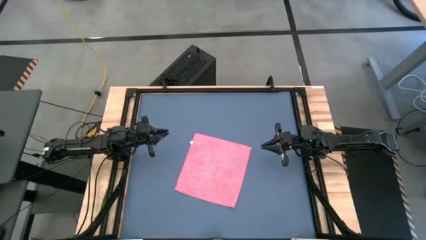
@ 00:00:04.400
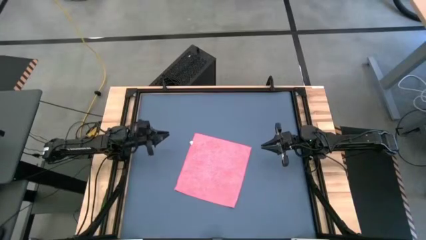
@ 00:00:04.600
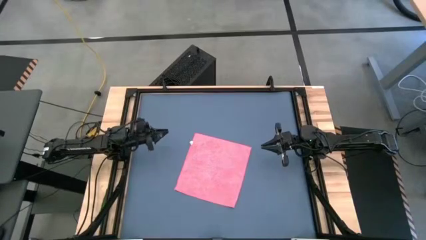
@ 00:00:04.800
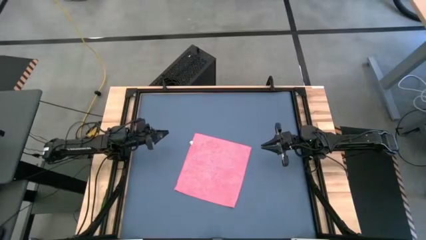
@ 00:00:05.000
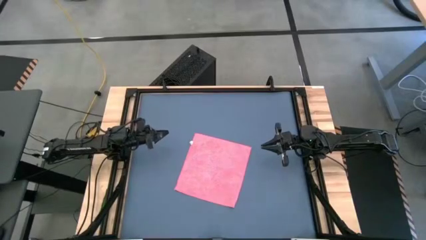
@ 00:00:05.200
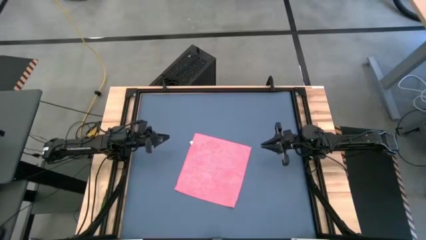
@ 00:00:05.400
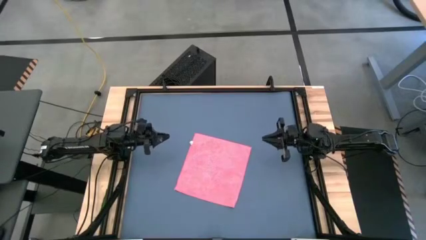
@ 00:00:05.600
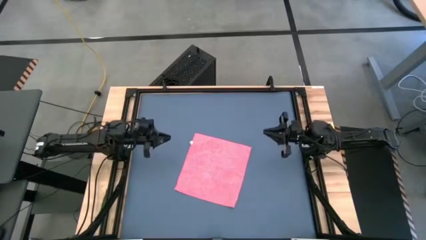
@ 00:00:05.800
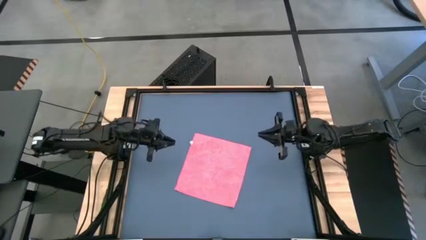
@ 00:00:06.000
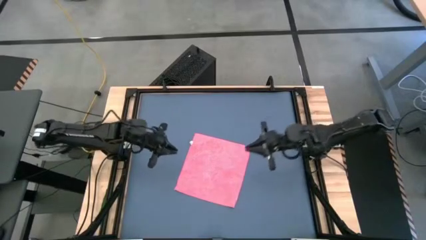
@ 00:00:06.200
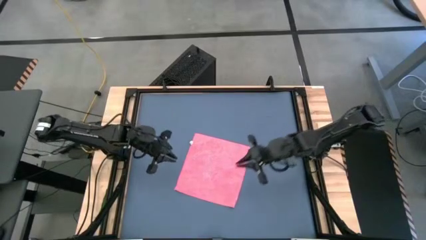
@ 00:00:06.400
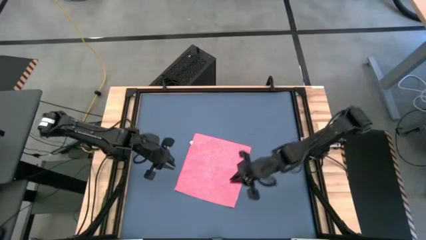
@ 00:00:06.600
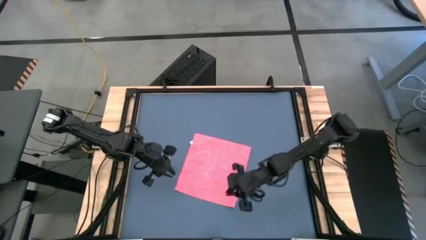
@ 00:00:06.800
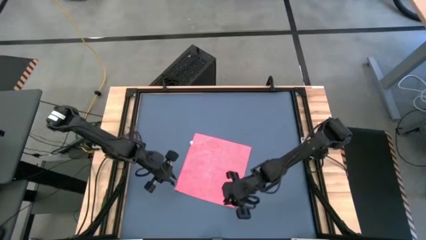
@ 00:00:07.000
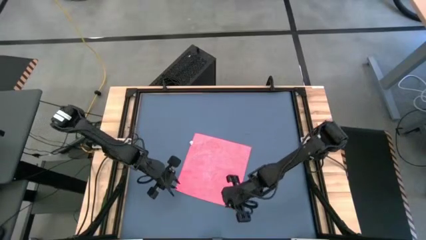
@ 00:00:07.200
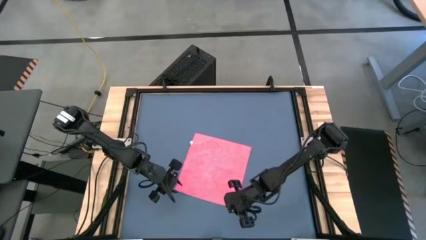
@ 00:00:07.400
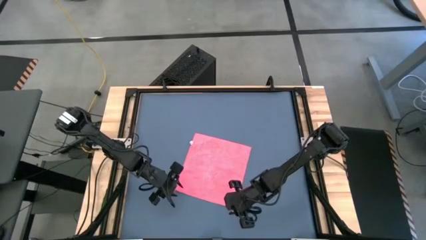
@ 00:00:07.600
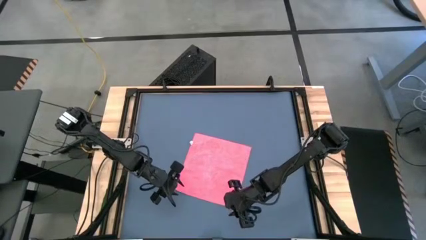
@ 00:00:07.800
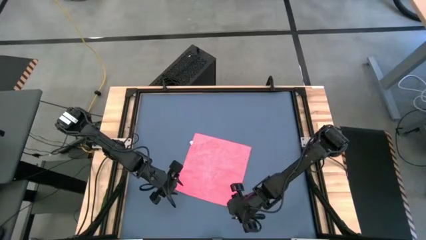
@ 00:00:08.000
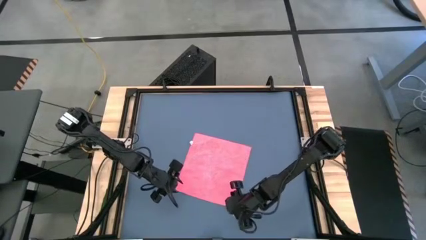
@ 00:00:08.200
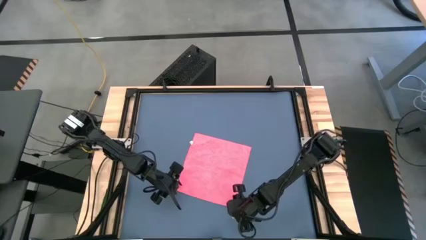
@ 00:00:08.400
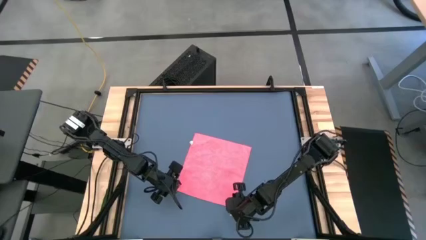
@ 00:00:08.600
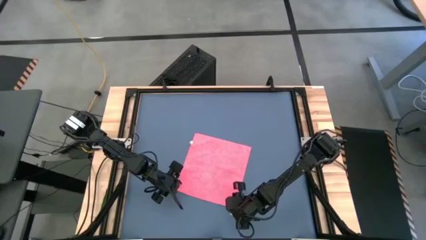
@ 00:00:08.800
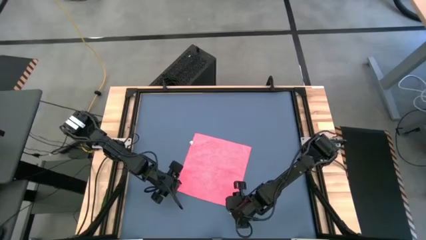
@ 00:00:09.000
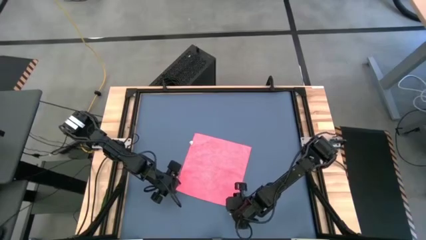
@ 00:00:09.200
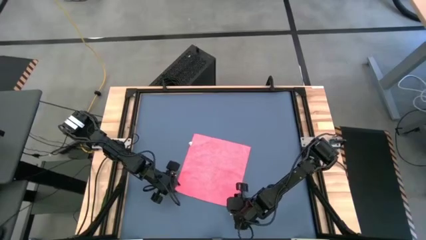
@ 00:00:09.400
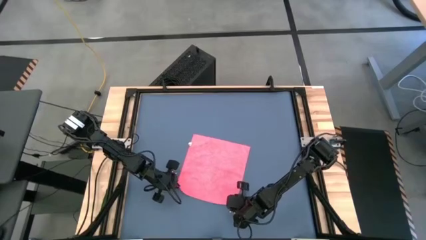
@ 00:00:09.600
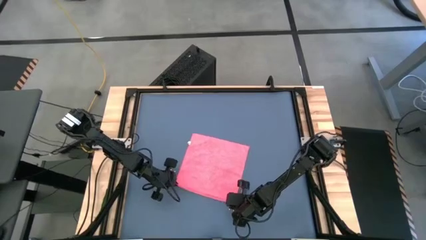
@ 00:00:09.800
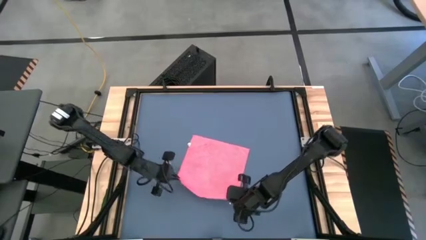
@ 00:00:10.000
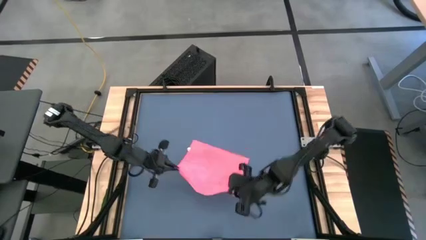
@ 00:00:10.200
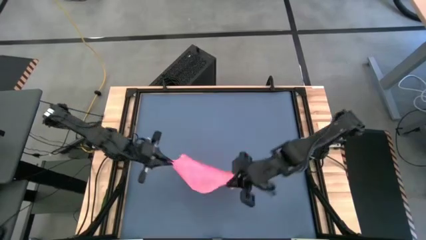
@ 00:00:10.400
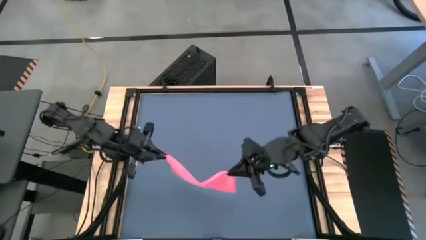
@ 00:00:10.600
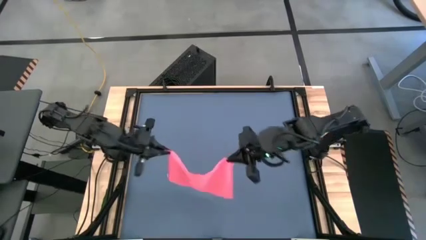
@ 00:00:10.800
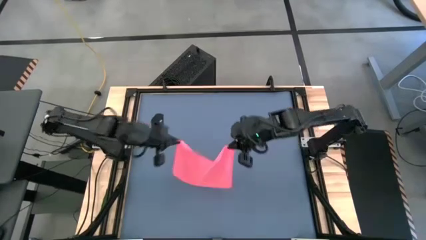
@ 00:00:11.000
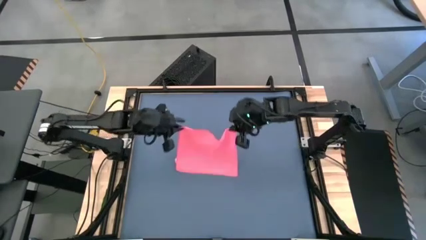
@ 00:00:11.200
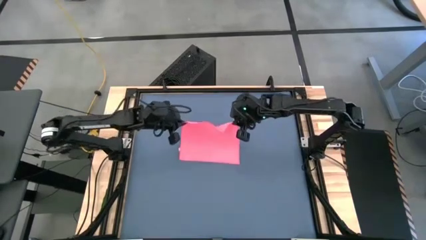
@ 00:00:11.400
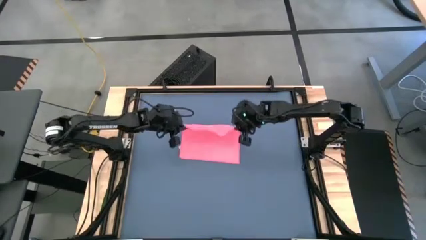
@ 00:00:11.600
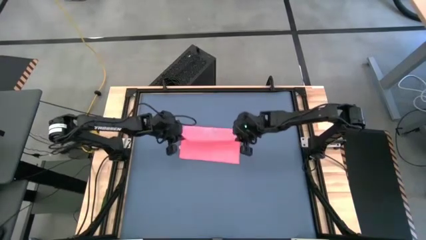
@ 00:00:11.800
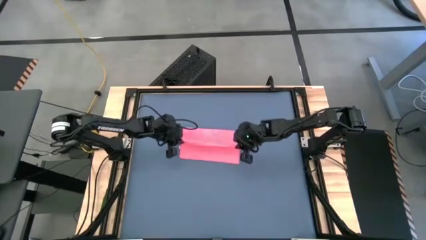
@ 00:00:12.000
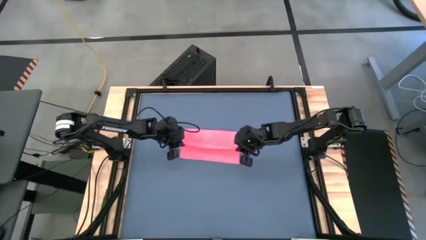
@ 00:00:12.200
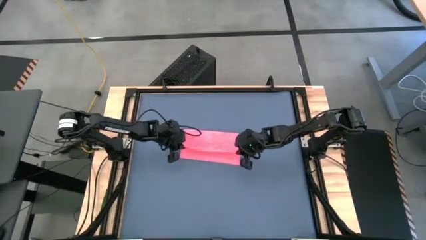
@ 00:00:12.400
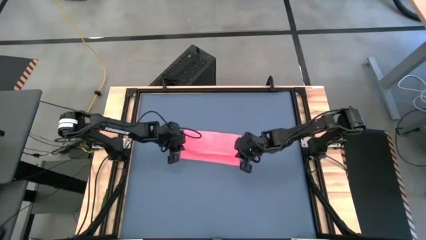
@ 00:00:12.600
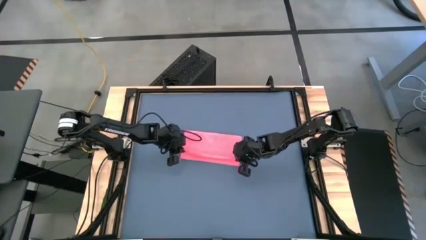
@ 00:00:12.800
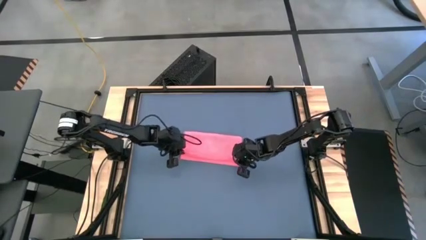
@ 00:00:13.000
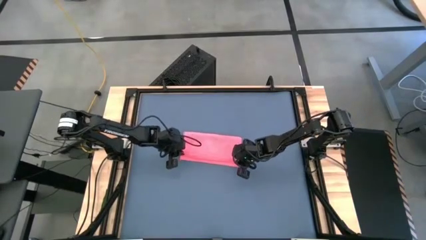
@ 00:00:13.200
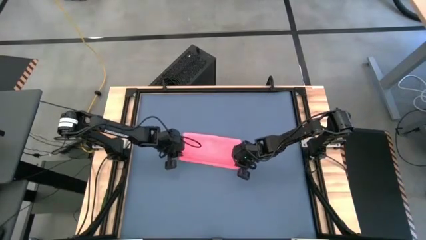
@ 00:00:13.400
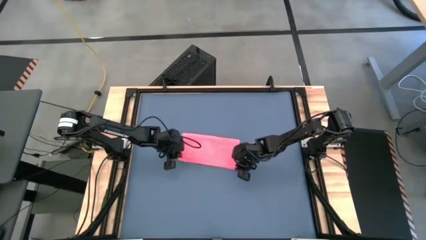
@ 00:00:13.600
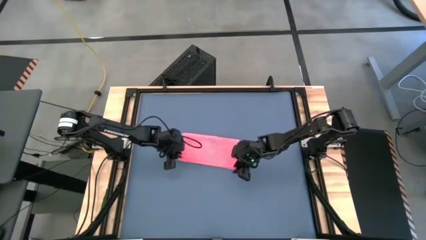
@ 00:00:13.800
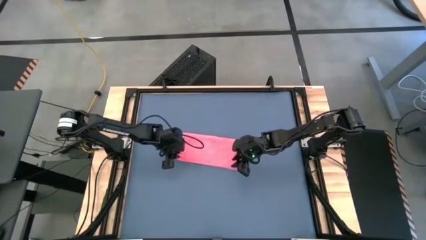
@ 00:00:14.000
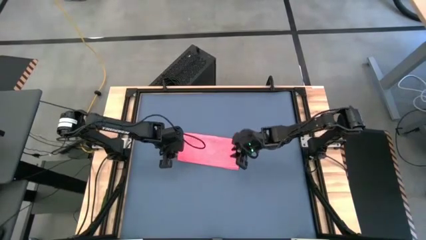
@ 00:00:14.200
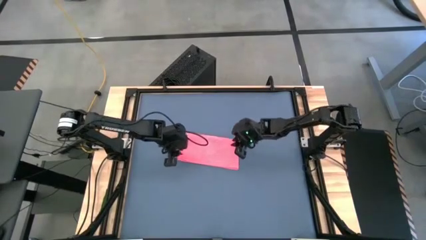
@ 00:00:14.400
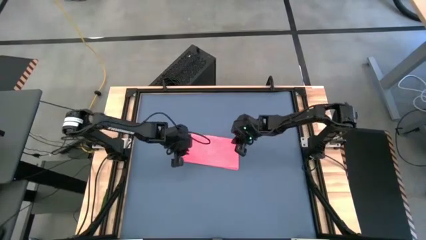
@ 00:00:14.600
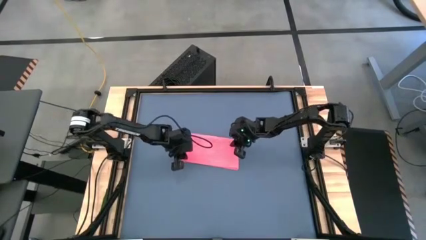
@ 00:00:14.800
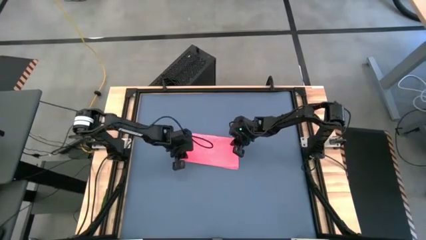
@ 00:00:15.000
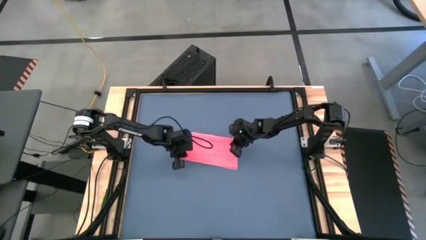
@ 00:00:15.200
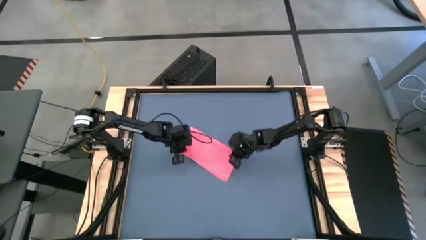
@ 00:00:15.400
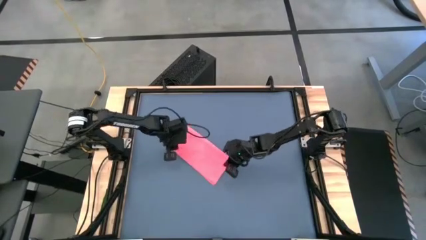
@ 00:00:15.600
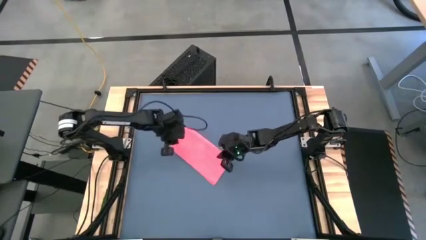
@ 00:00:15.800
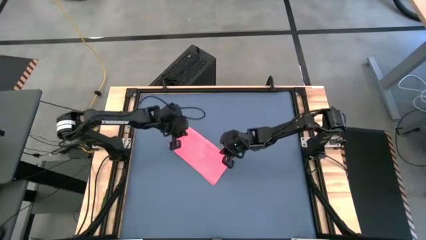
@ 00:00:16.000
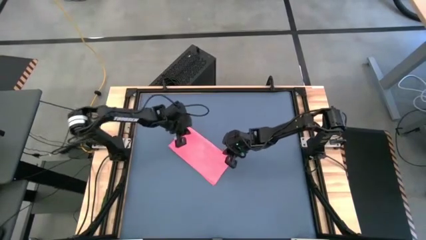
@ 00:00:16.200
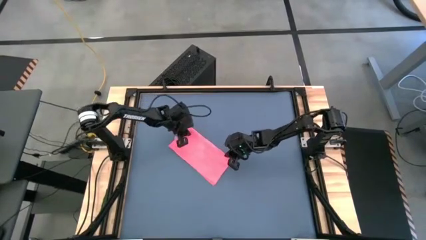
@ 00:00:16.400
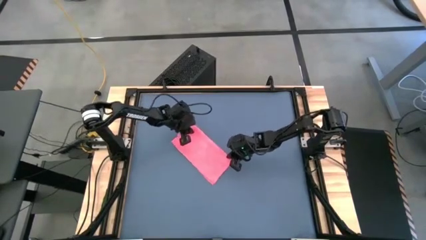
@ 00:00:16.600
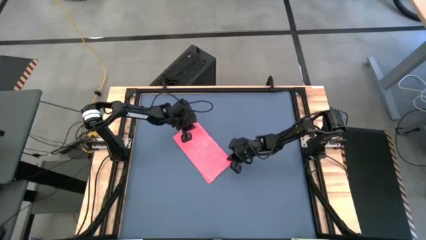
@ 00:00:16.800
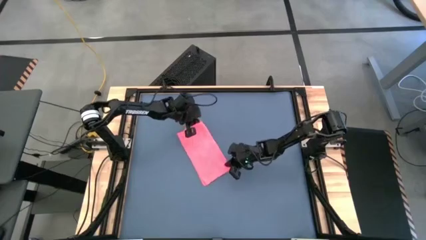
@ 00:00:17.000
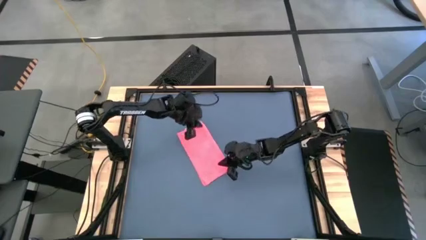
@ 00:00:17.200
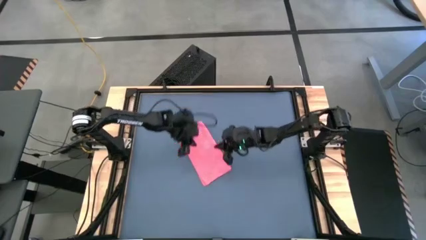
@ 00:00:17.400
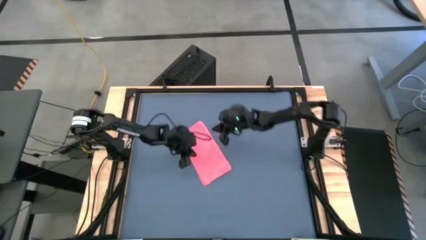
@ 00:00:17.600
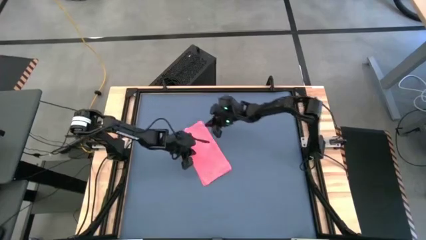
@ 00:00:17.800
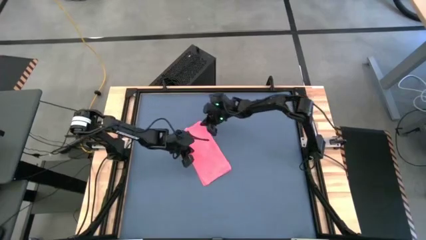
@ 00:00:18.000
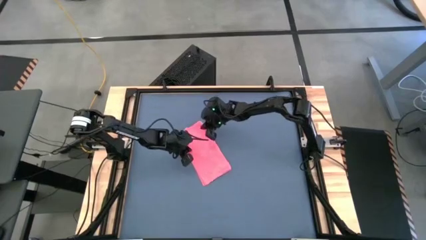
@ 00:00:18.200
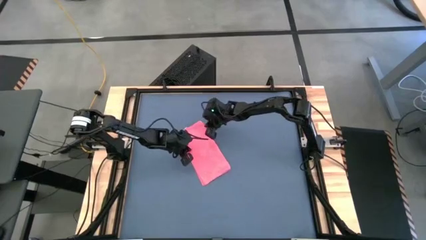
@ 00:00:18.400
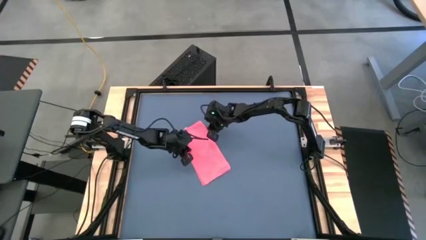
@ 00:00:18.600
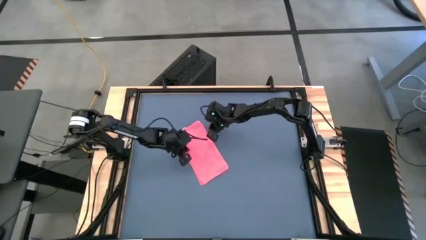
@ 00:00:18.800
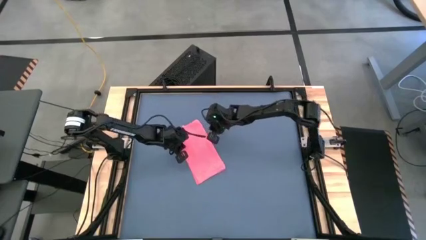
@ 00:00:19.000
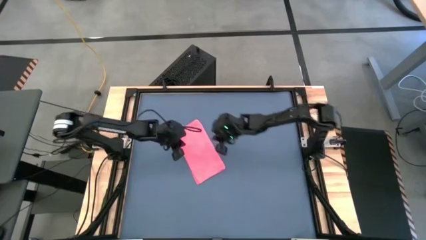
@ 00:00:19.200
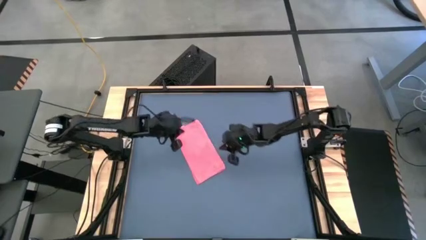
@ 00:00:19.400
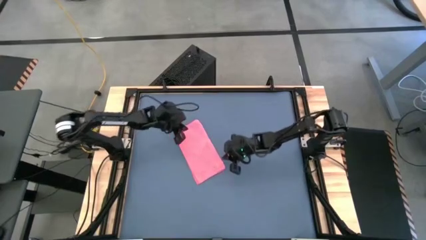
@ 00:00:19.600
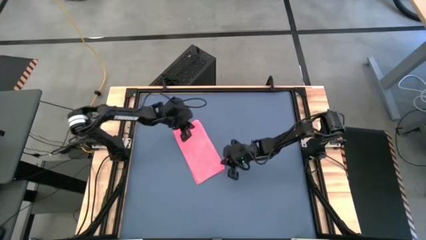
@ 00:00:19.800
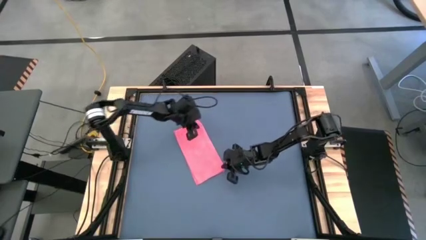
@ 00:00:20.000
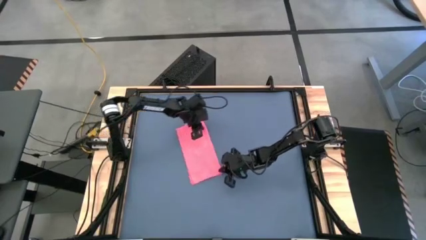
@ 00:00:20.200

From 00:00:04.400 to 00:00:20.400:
Task: Roll towel
Roll the red microfiber cloth
